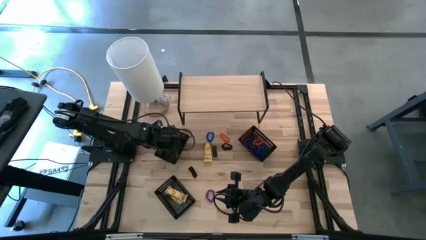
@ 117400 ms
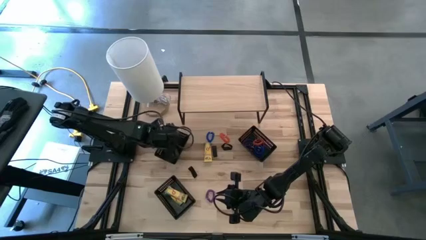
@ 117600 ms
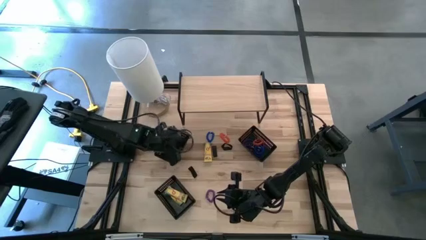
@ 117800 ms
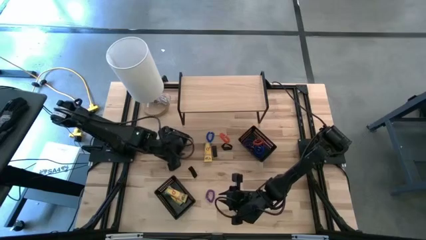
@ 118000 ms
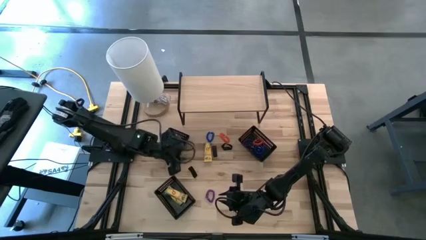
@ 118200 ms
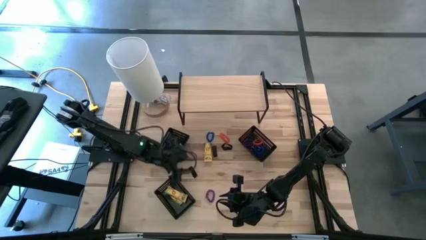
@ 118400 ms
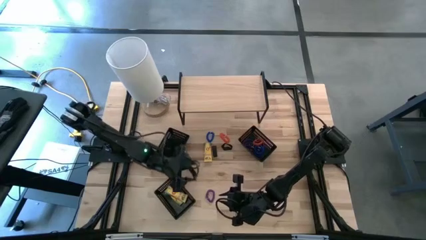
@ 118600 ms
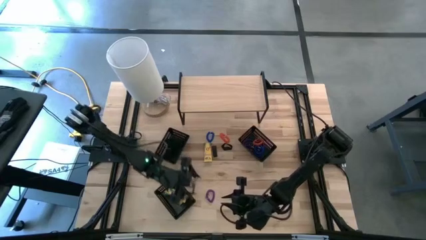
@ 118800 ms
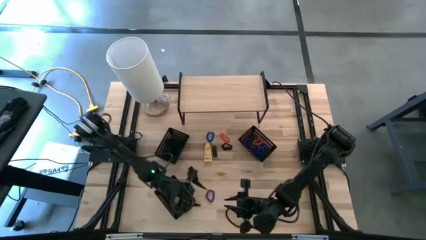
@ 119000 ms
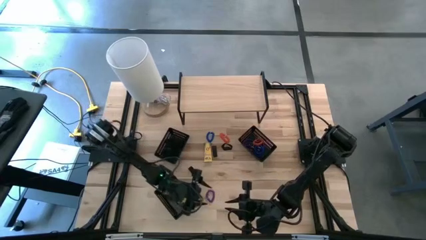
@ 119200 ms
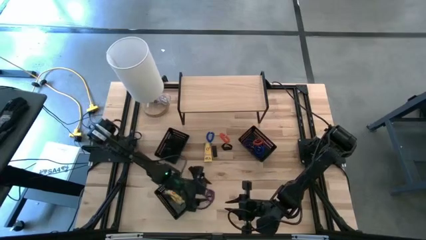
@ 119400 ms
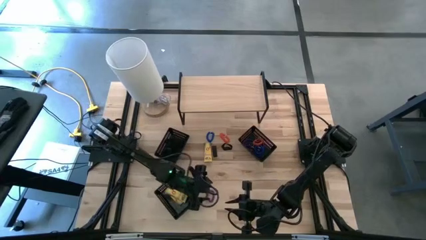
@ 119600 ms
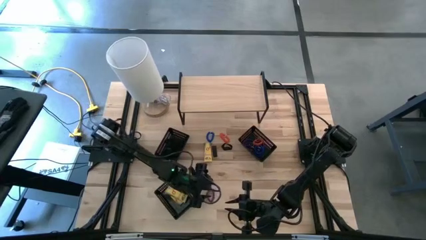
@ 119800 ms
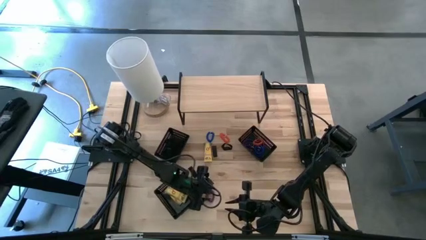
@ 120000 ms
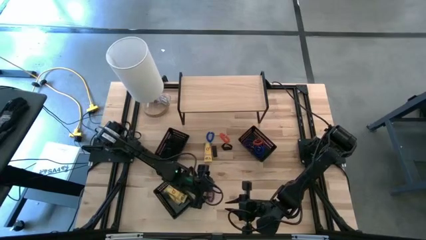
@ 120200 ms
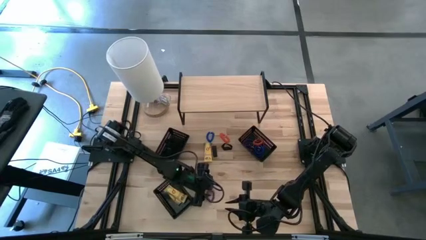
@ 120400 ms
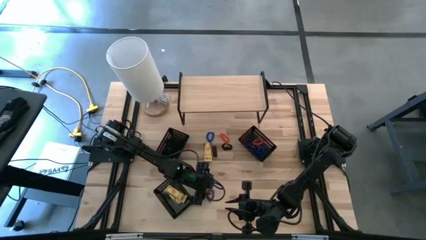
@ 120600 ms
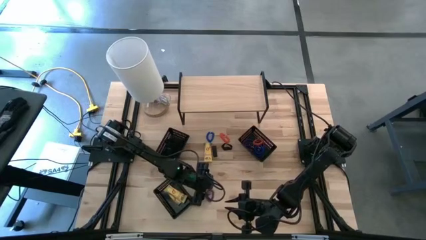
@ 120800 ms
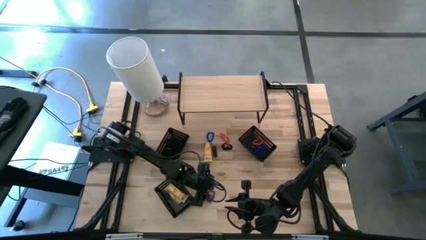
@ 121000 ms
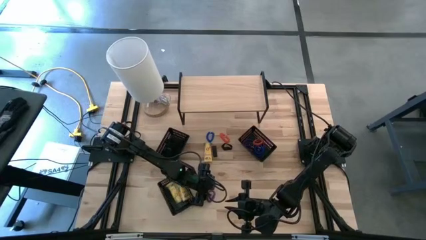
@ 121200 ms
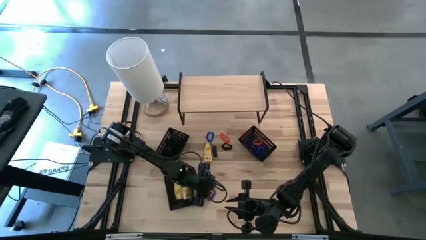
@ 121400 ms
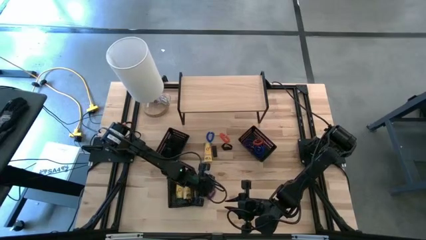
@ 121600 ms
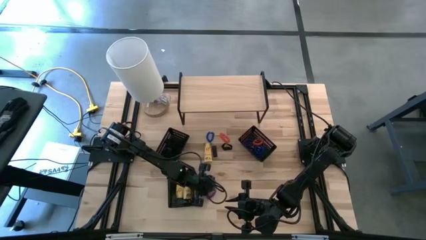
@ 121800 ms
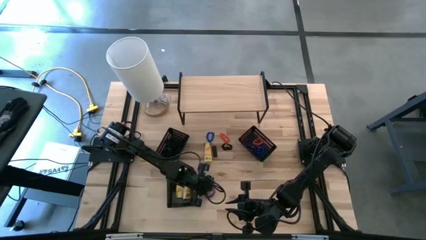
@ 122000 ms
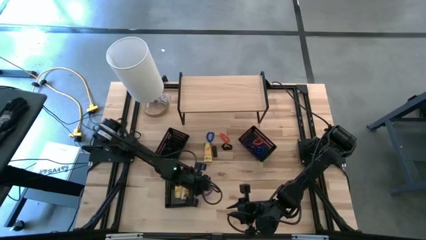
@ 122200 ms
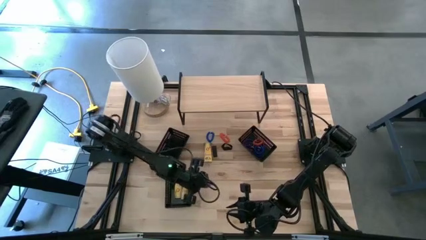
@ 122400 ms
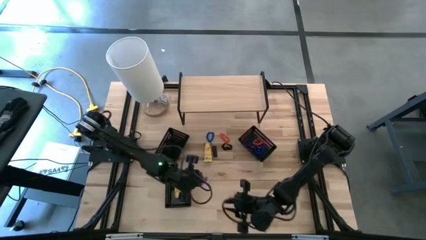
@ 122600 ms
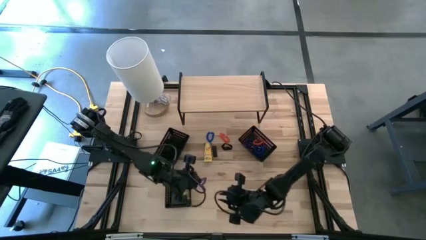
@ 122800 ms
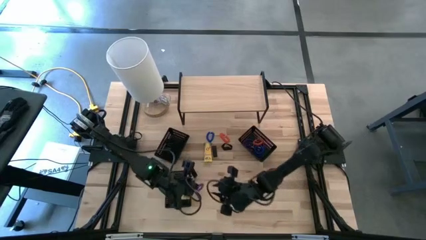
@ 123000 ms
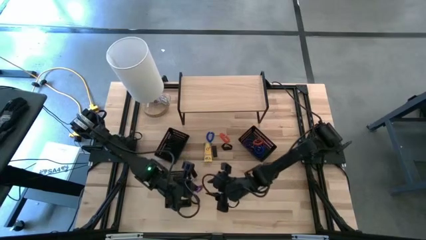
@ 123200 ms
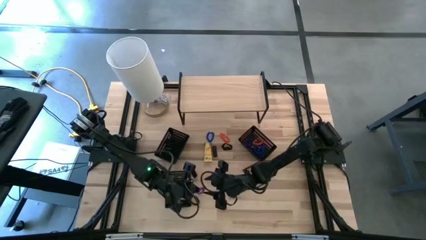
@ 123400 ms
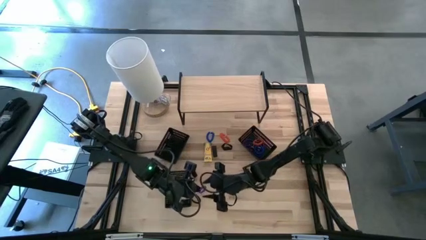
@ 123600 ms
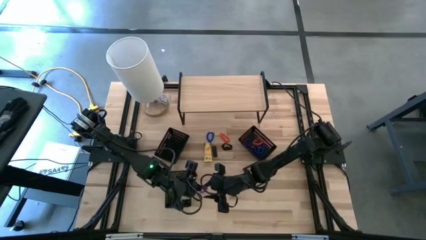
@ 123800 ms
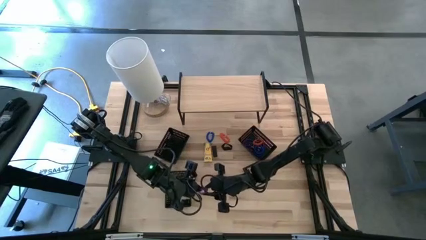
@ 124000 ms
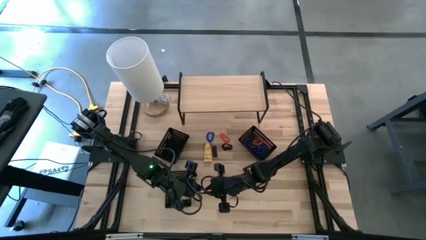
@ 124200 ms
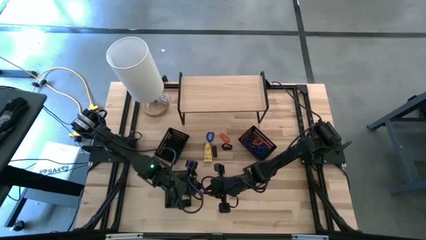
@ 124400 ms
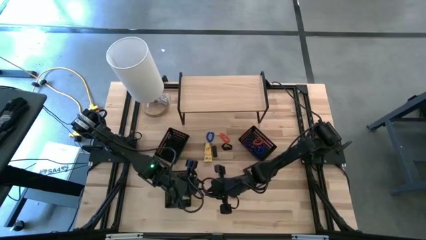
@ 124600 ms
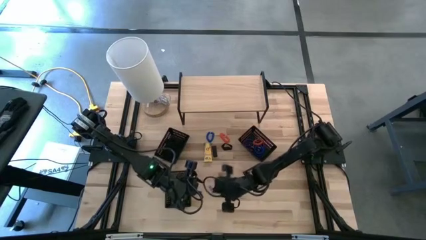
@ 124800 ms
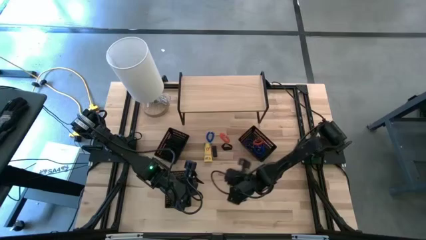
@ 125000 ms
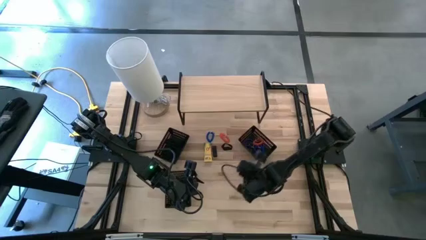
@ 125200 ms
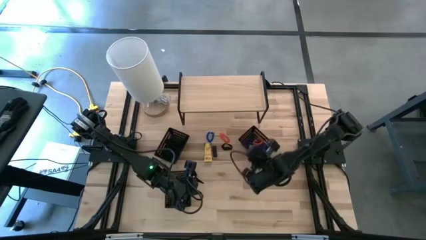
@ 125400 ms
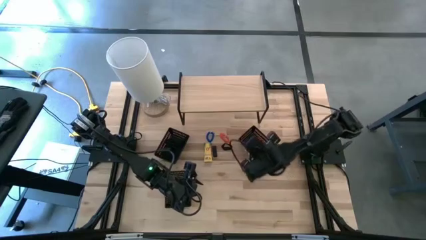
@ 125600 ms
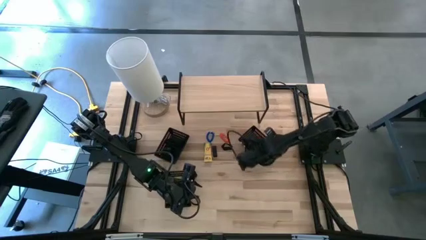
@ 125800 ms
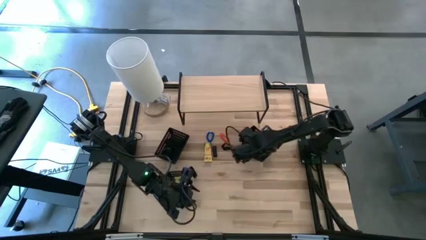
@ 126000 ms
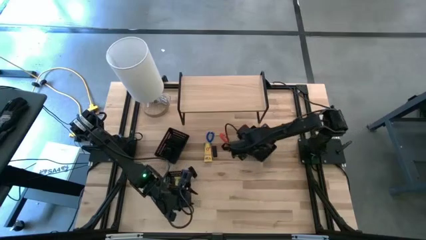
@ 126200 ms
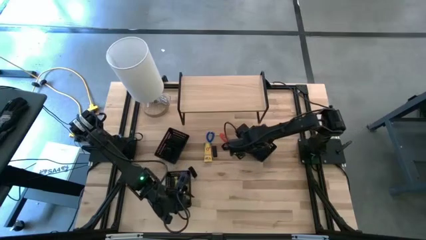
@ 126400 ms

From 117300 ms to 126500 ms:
Task: Pick & Place Office Desk Supplies
Put the purple spring keychain into the top right black bin

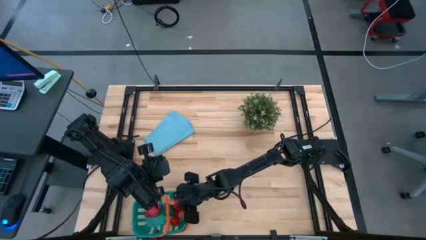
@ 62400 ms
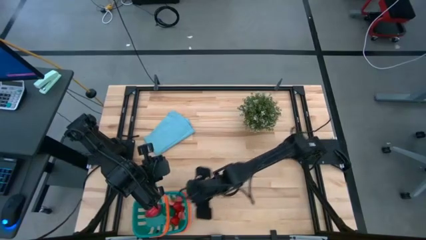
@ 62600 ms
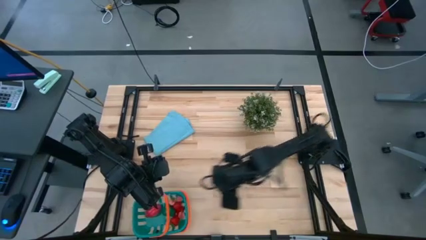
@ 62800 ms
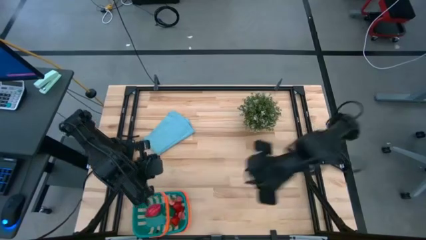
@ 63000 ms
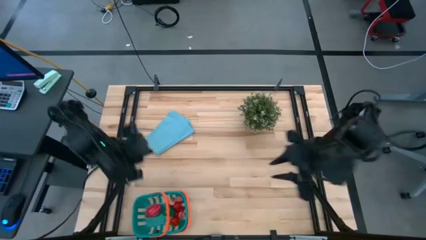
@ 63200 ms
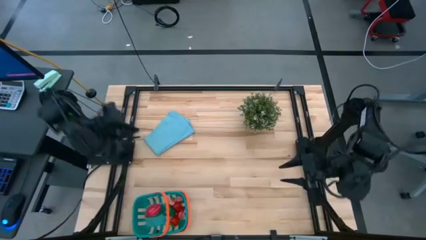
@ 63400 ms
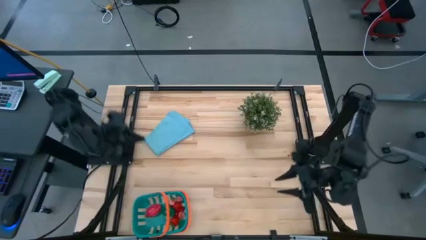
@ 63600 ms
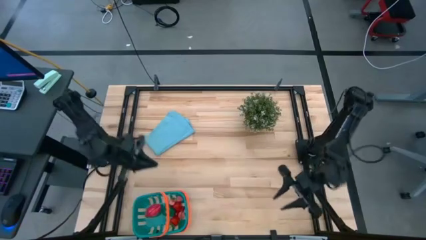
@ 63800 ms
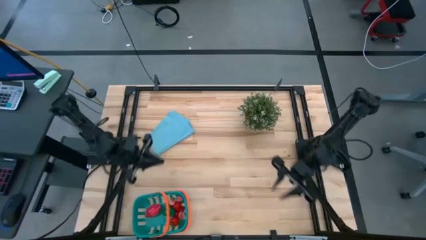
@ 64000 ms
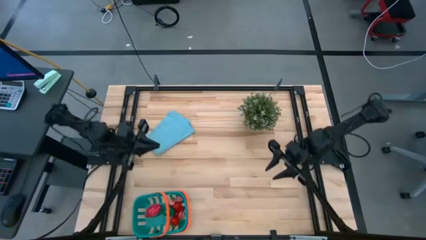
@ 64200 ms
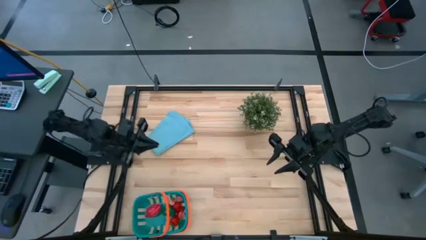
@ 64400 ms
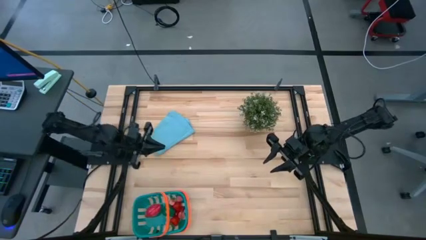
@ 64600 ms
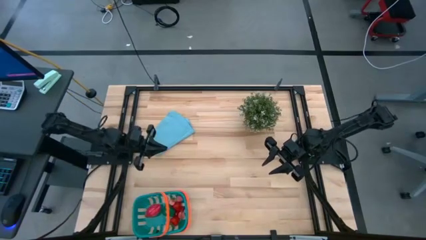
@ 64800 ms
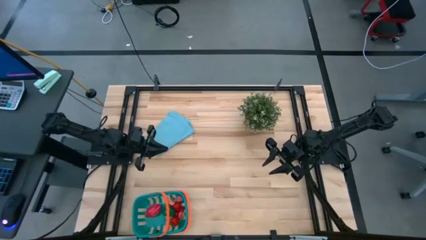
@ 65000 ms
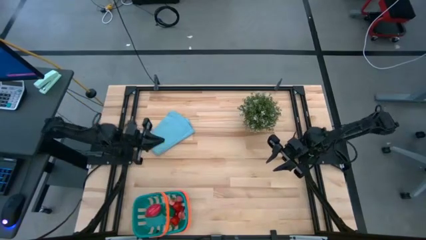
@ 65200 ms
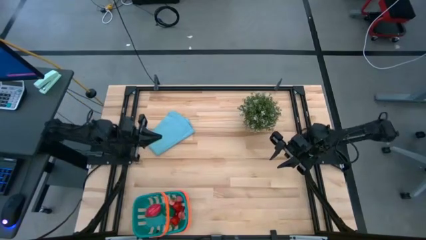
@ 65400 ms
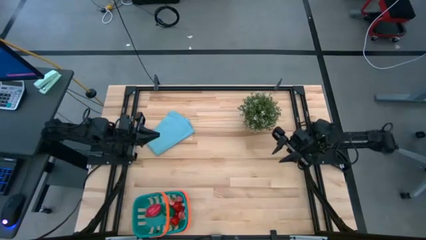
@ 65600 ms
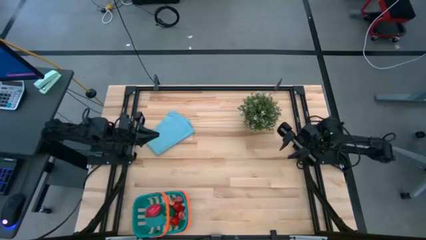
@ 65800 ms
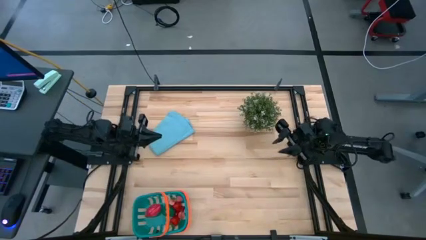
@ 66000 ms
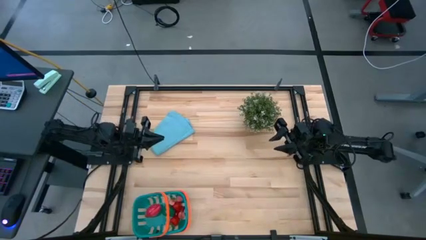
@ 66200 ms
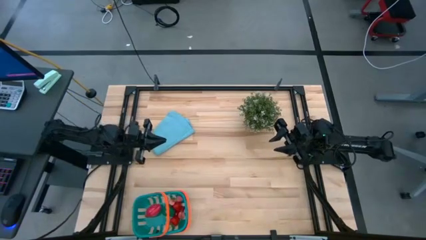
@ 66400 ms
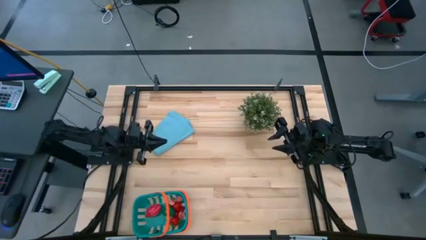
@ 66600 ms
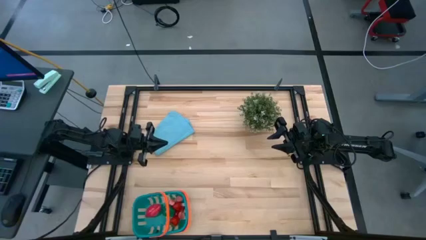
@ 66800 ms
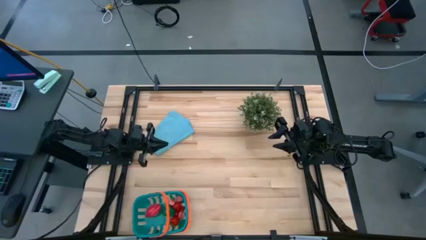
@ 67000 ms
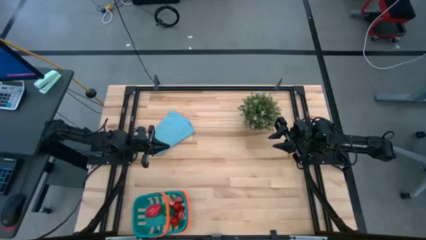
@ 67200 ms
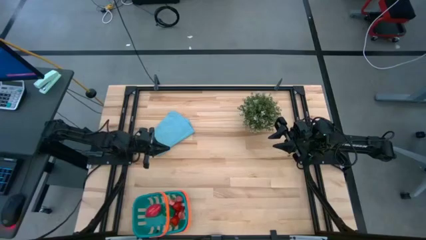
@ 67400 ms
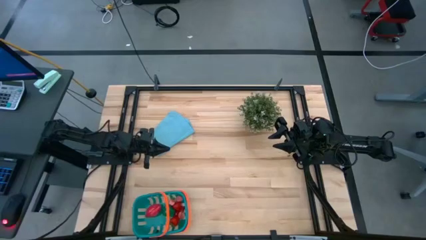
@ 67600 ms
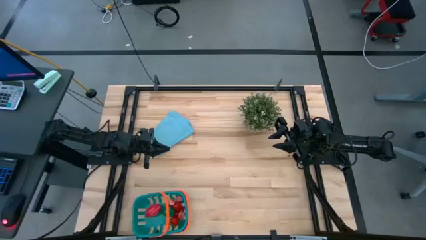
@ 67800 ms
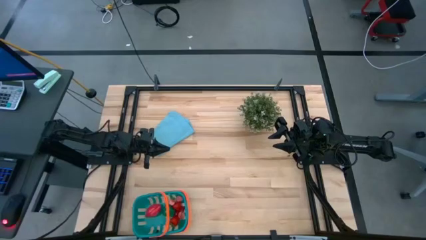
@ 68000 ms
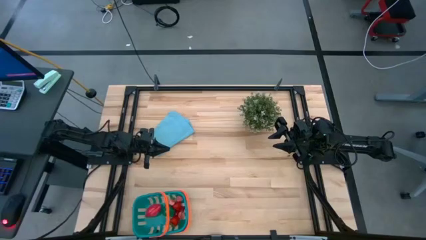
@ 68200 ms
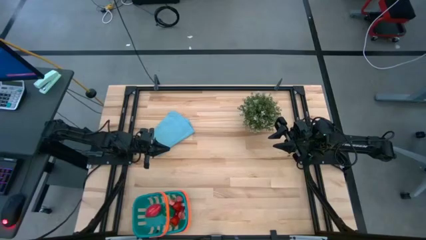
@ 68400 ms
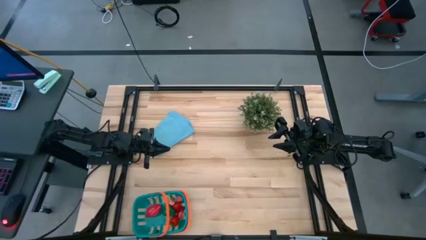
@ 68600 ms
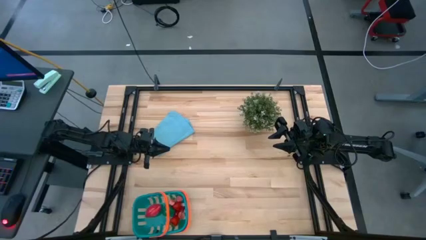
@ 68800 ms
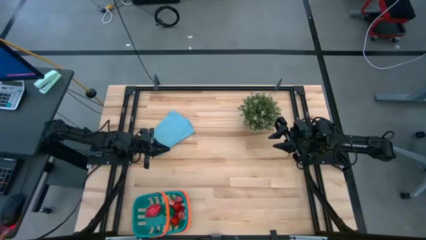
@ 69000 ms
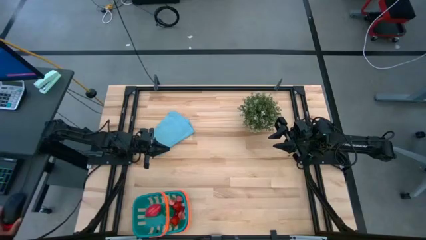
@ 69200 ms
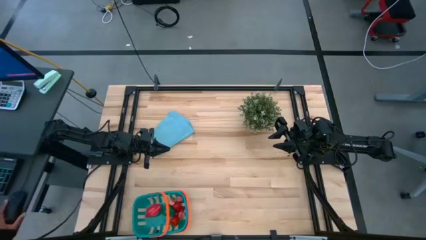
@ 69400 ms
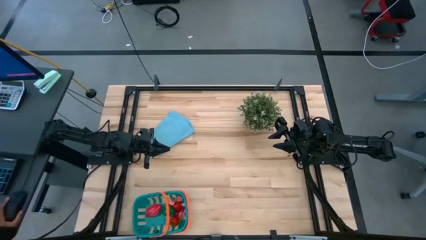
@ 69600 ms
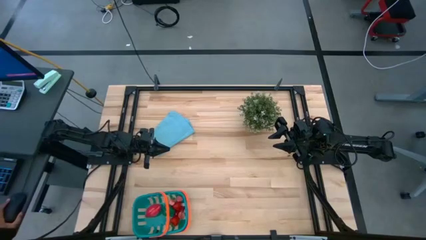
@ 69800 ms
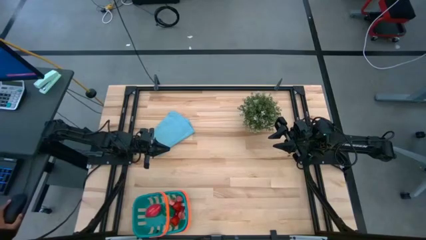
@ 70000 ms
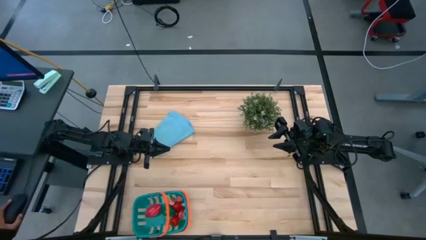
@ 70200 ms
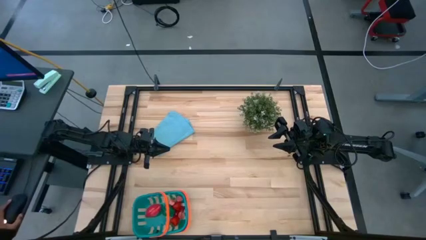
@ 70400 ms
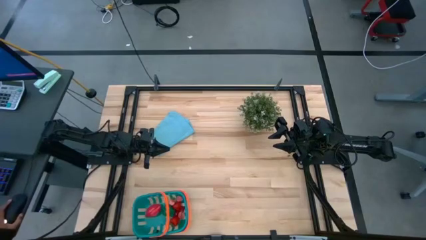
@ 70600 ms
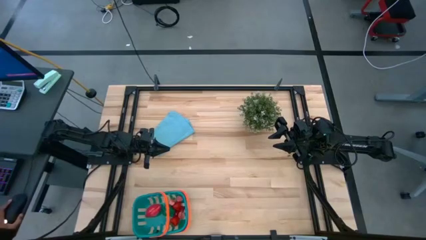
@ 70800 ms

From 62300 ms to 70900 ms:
Task: Pick and placing Produce into tupperware
Return to Home Position
